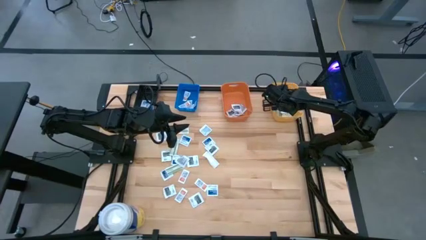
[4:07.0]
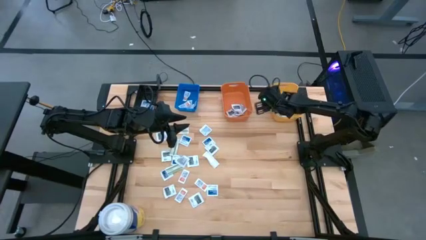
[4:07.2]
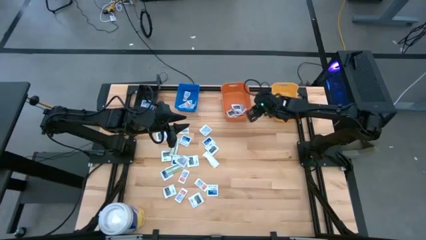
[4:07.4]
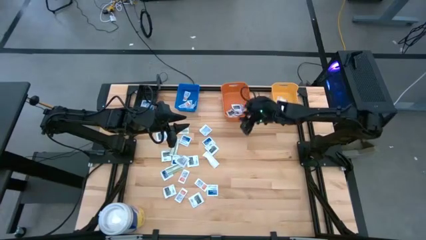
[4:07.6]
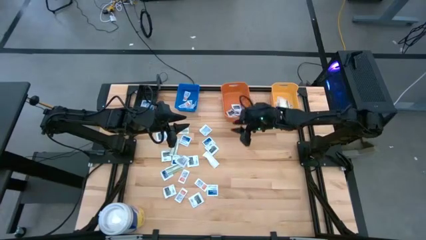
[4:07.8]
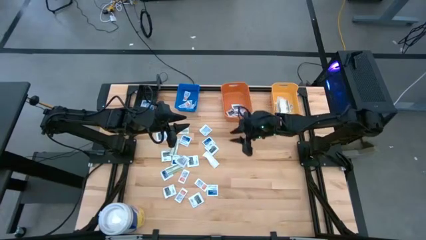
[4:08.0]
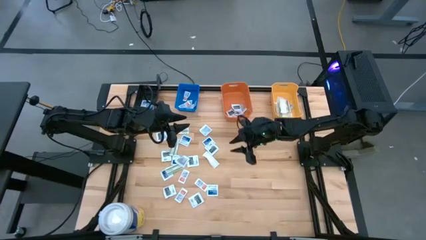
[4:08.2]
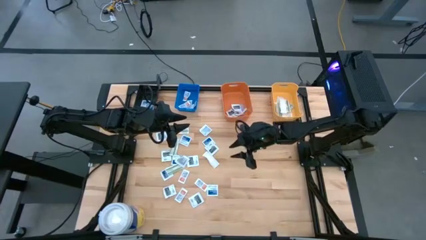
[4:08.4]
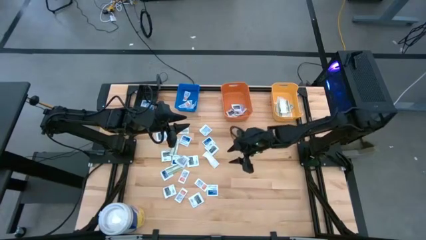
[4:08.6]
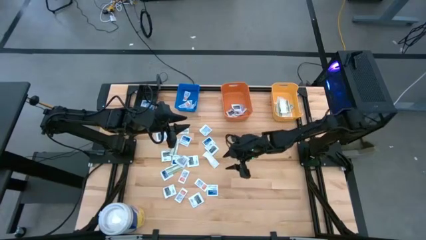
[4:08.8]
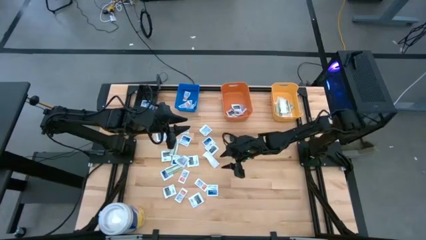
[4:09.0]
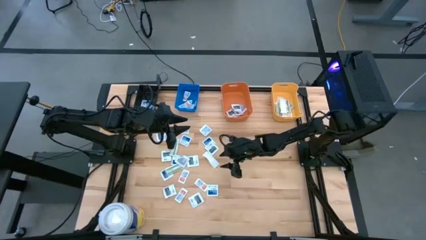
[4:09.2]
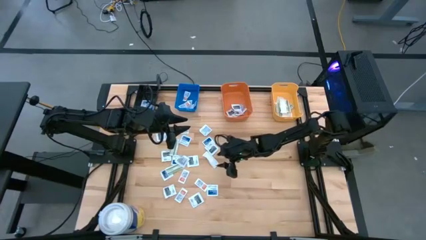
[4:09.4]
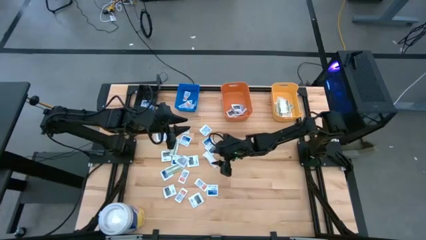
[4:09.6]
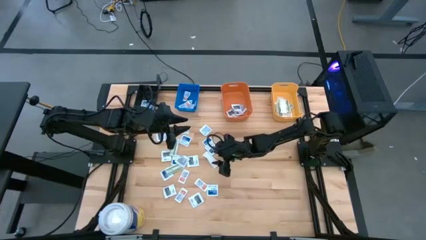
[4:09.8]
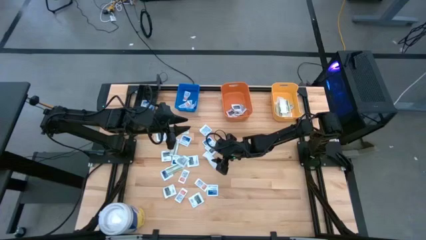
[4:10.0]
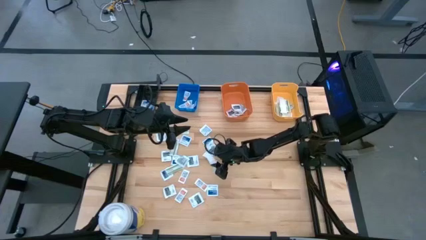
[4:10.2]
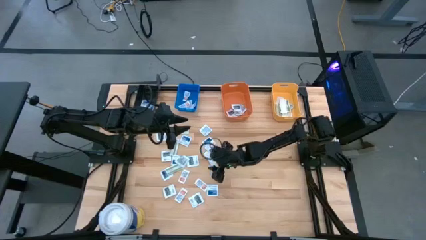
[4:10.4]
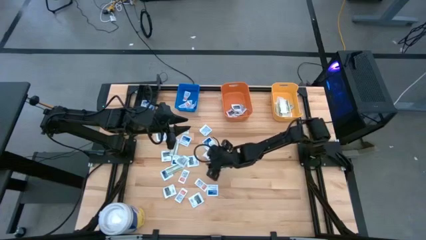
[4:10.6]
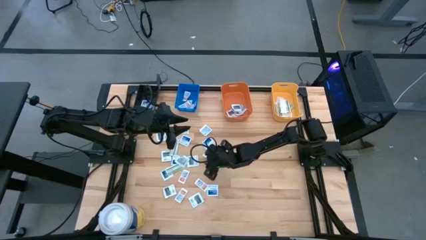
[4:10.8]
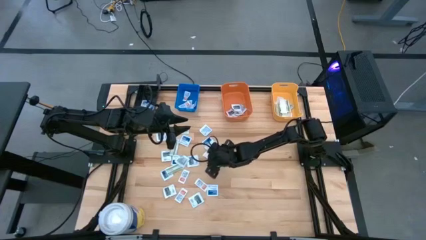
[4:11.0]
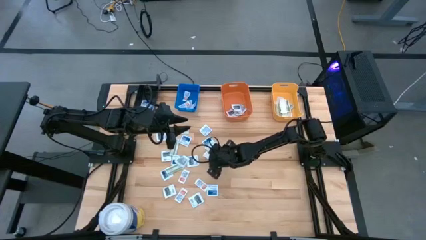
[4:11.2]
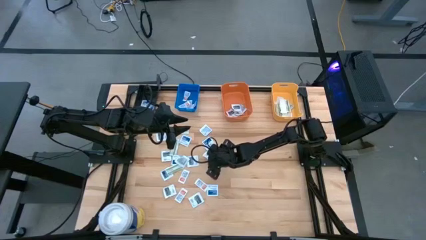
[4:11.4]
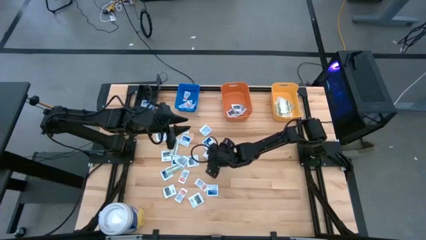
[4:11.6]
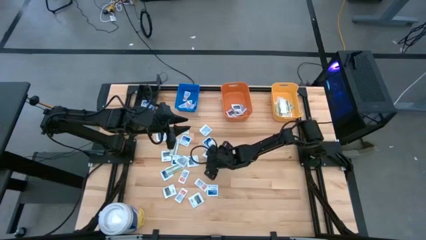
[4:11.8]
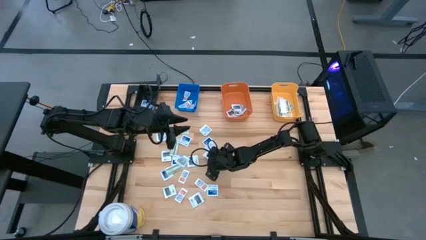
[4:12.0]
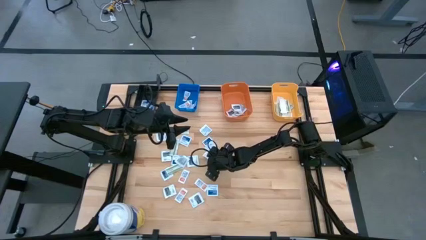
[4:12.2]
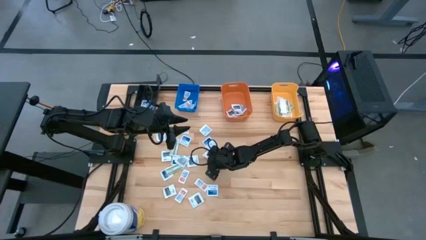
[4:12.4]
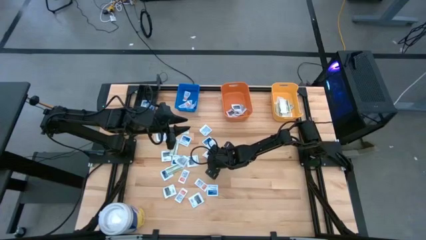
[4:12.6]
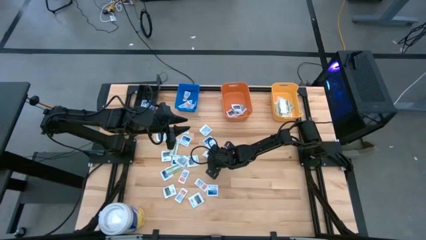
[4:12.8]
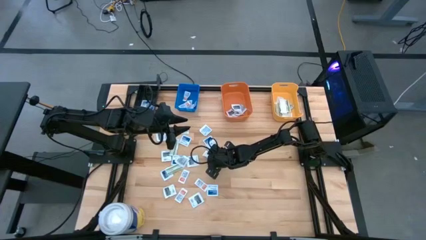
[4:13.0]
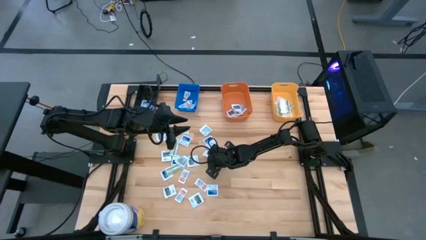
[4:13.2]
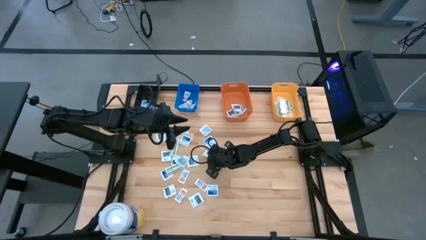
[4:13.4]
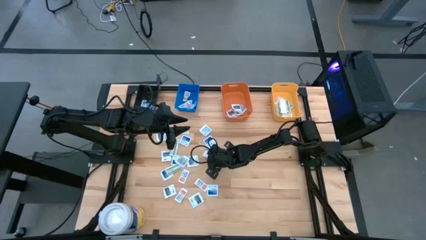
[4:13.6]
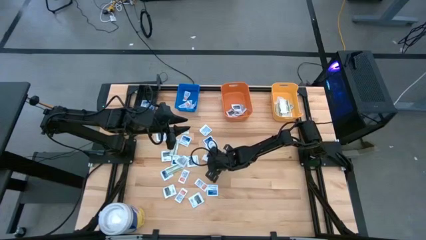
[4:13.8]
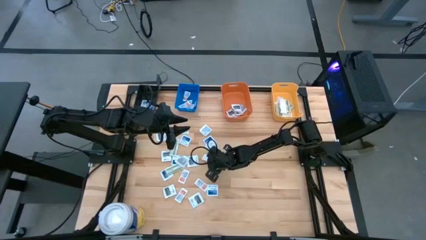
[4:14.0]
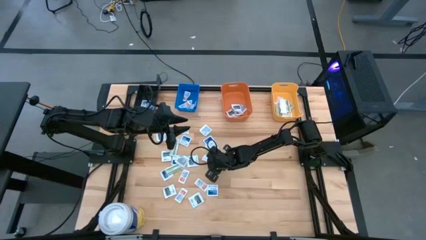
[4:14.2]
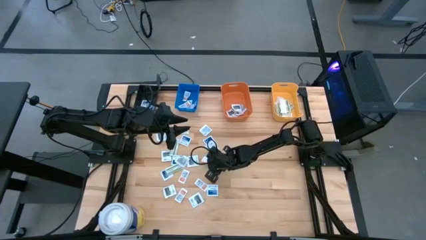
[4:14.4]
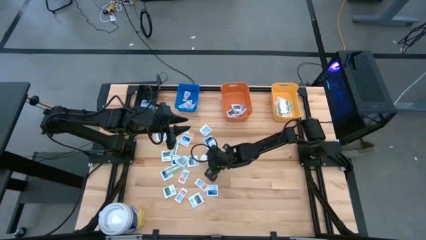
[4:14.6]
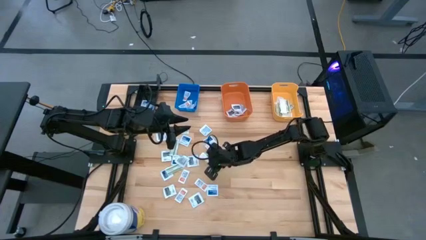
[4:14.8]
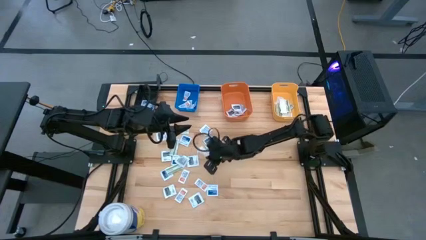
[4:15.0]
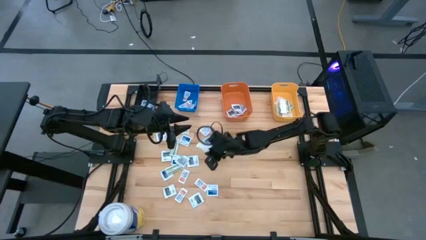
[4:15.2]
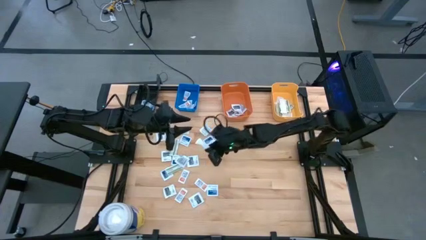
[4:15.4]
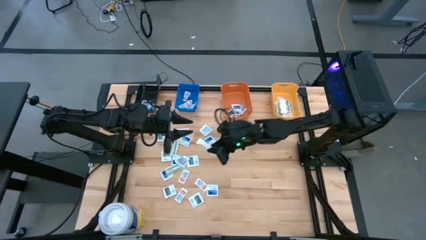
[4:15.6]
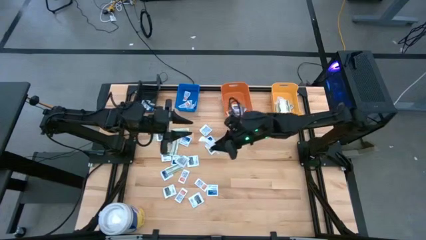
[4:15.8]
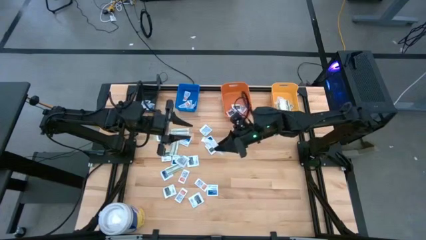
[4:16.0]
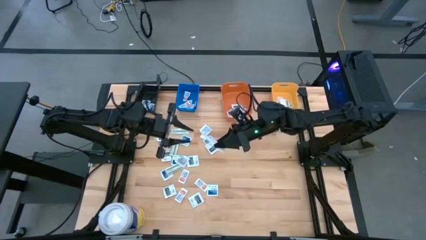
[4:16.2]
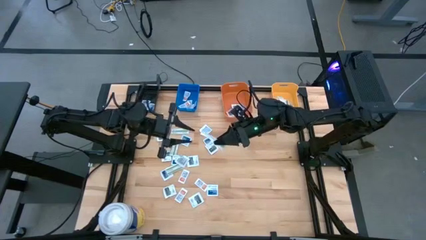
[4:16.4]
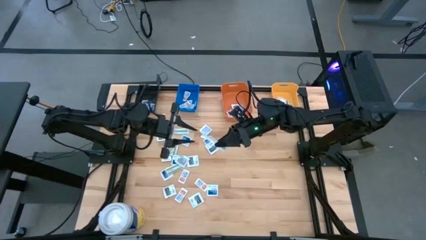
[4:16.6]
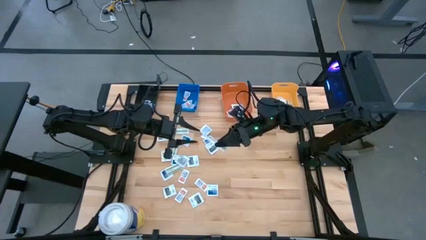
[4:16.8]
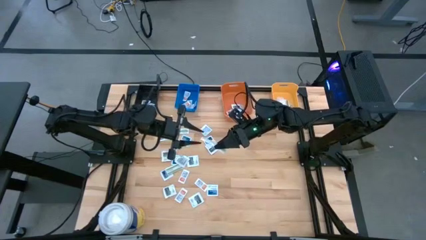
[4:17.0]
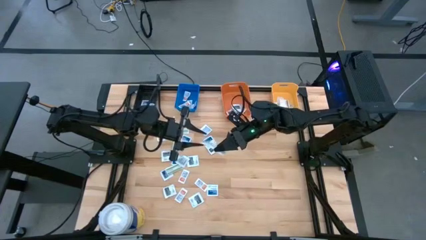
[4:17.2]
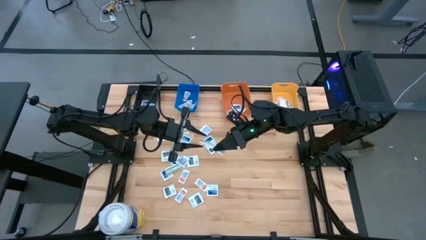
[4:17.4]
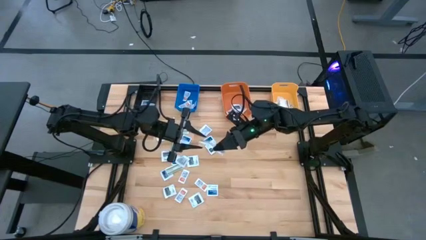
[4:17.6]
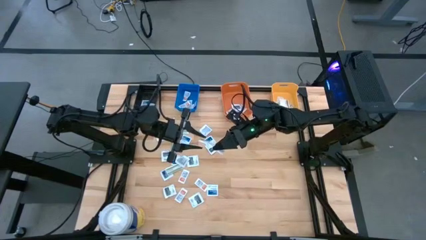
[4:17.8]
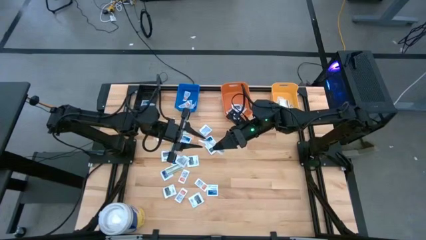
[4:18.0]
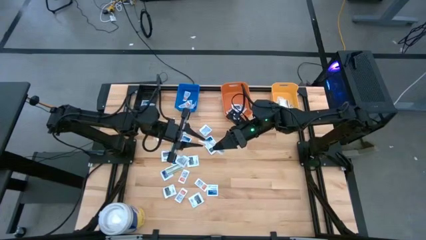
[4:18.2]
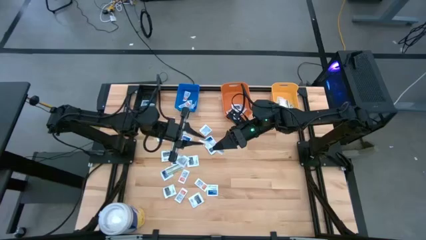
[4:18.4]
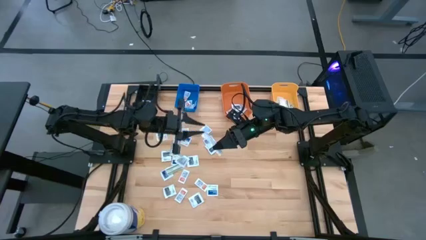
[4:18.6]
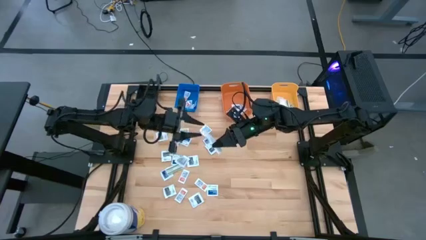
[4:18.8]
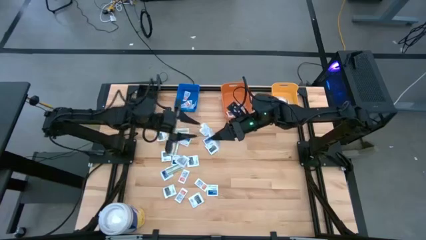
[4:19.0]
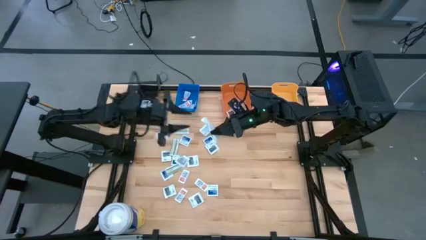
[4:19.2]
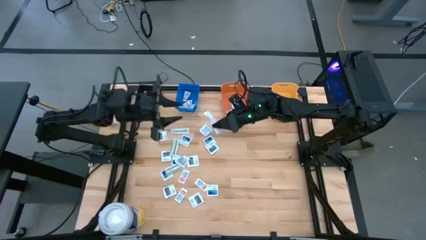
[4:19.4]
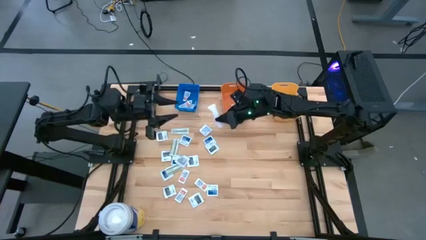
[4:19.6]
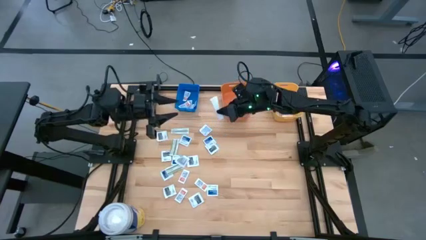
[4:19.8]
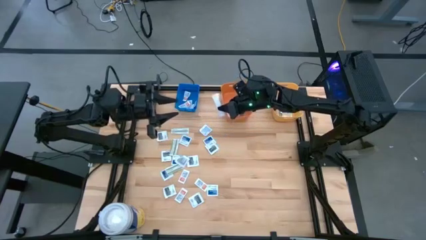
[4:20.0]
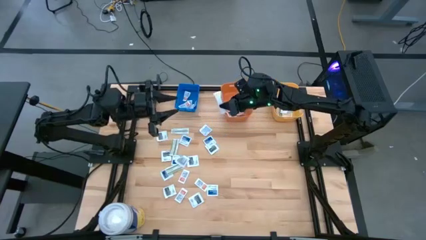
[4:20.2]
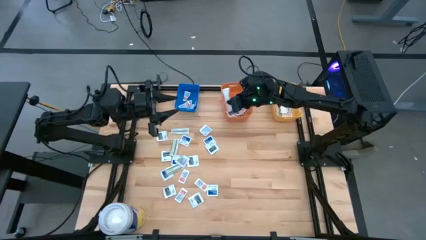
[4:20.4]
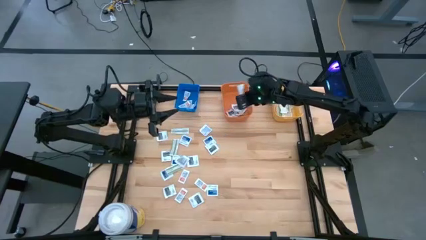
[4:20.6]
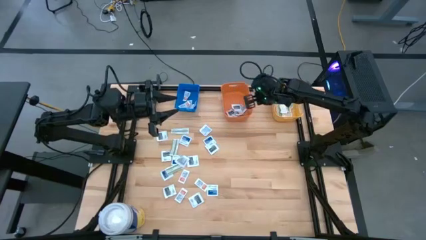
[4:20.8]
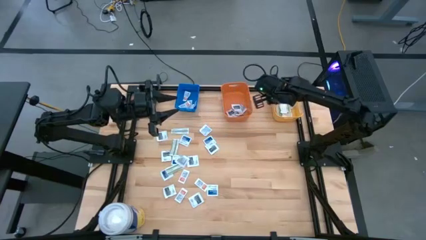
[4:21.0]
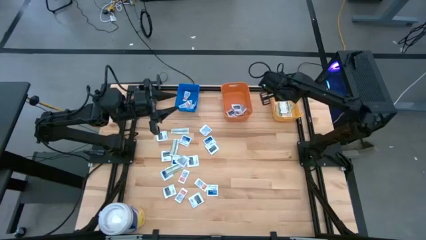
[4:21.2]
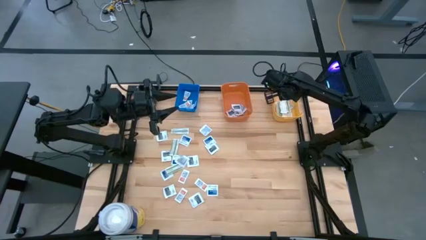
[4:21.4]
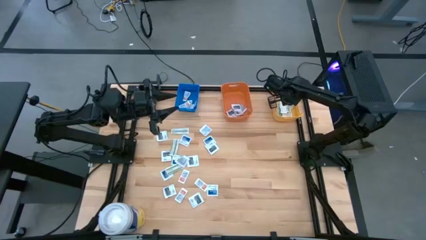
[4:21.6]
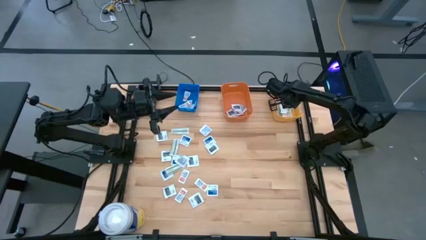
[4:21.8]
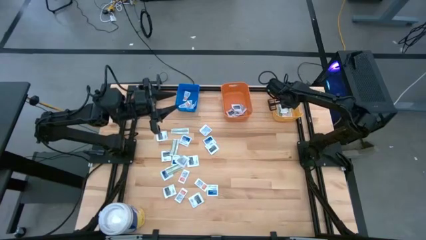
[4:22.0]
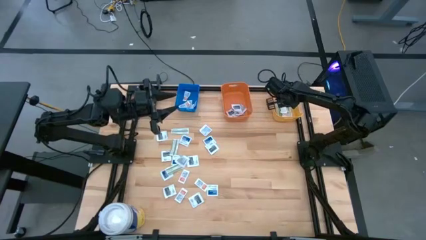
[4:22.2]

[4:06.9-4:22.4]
Task: Pick & Place First Aid Supplies
Put the bandage into the yellow bin
